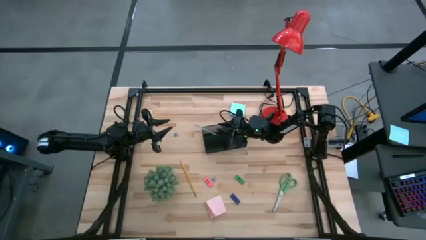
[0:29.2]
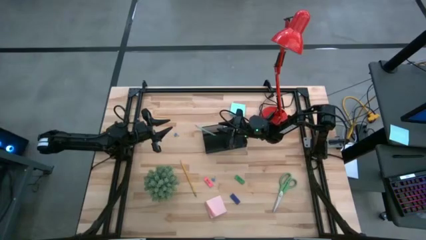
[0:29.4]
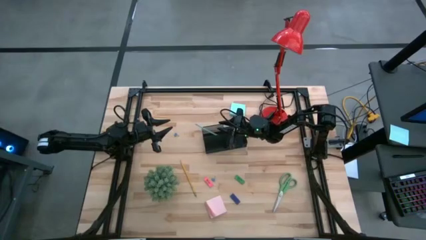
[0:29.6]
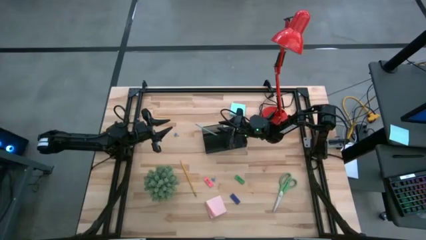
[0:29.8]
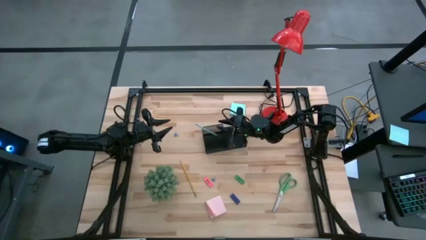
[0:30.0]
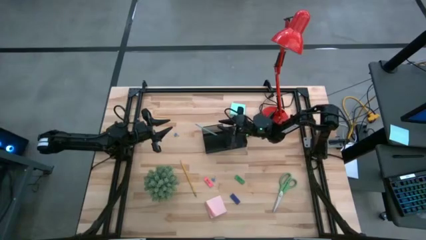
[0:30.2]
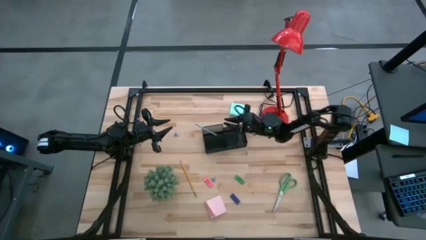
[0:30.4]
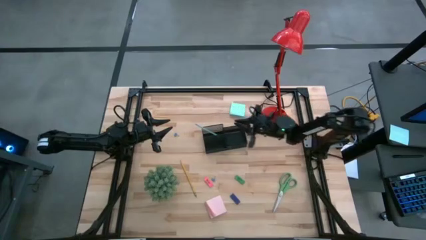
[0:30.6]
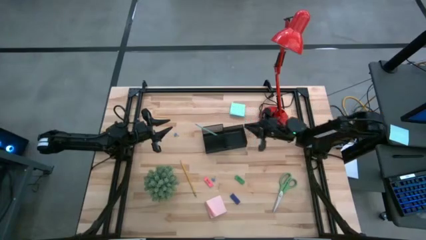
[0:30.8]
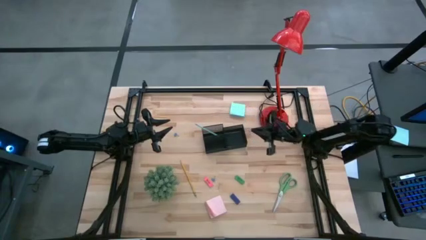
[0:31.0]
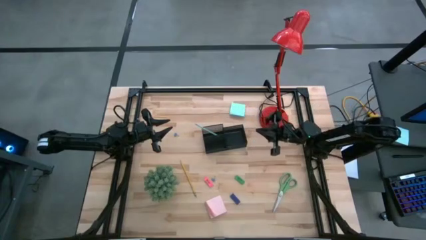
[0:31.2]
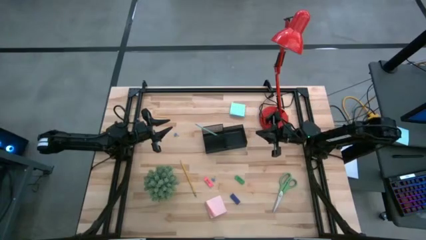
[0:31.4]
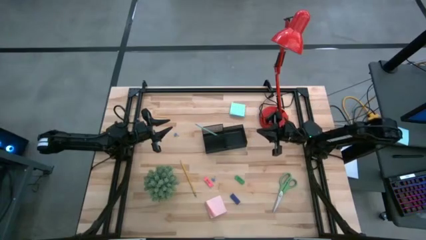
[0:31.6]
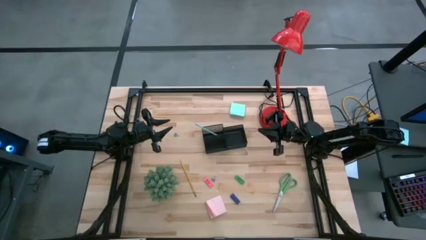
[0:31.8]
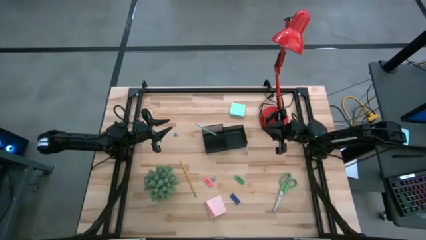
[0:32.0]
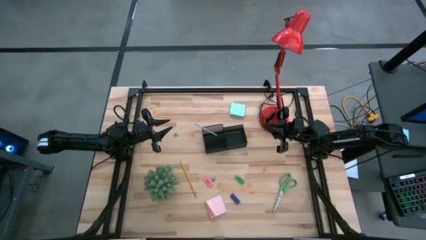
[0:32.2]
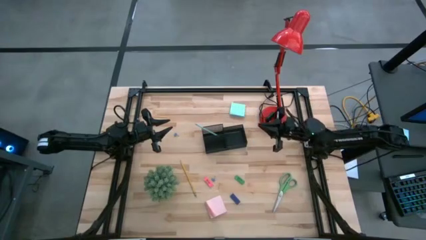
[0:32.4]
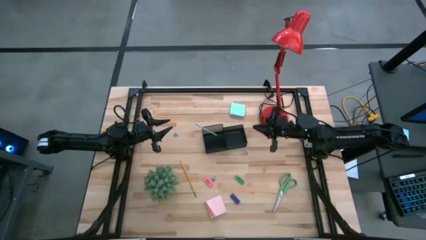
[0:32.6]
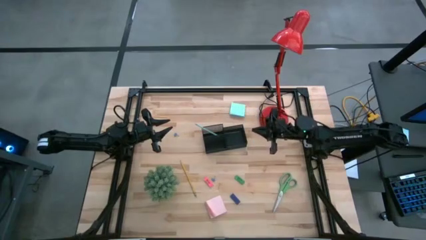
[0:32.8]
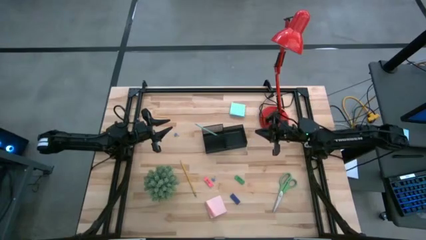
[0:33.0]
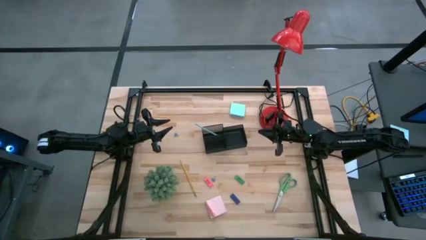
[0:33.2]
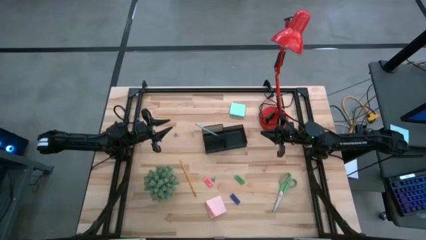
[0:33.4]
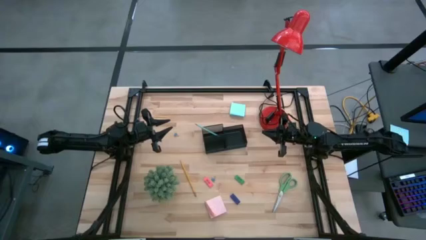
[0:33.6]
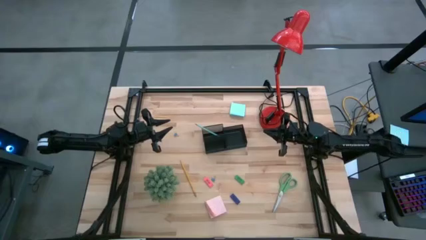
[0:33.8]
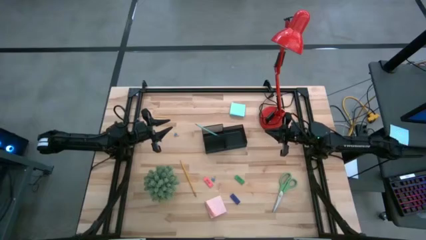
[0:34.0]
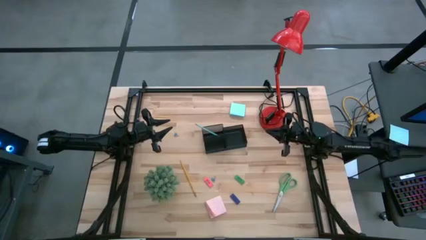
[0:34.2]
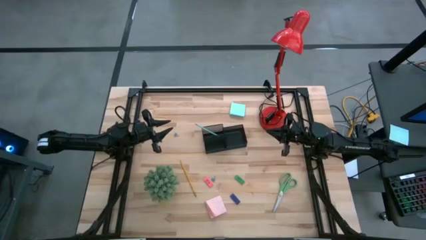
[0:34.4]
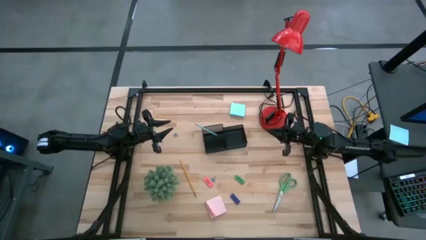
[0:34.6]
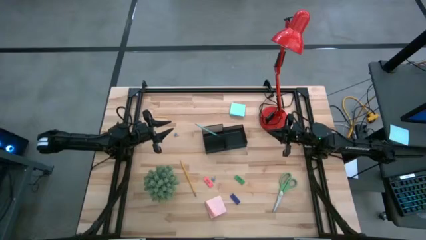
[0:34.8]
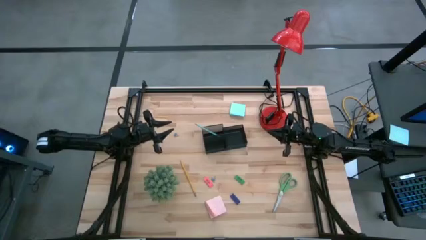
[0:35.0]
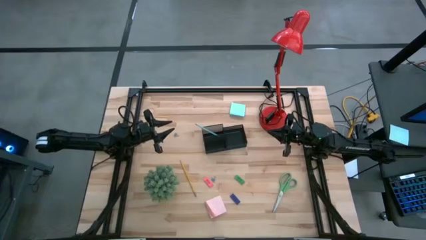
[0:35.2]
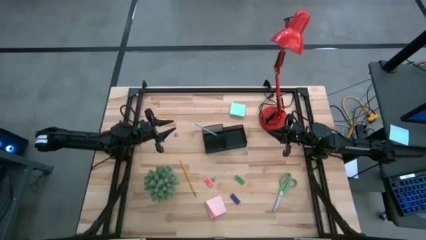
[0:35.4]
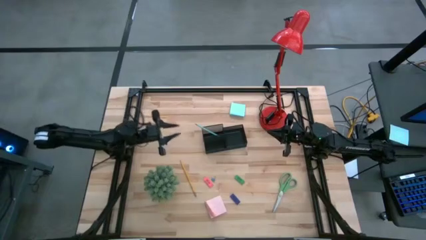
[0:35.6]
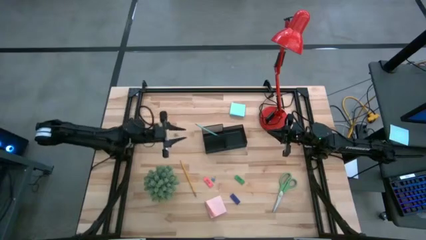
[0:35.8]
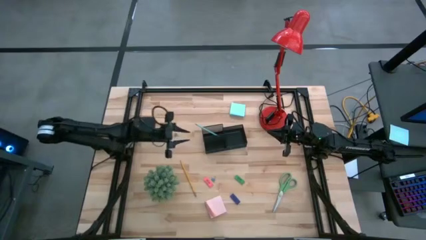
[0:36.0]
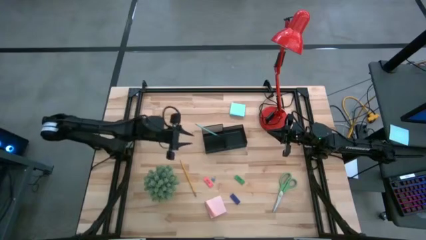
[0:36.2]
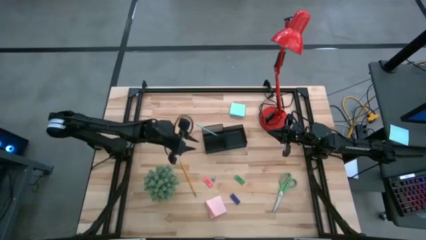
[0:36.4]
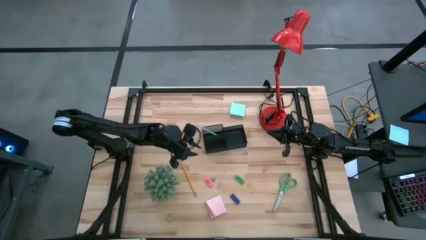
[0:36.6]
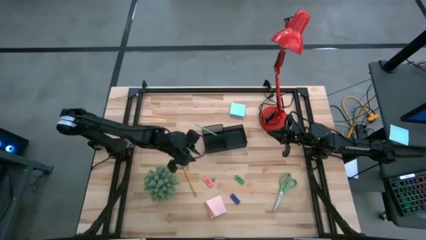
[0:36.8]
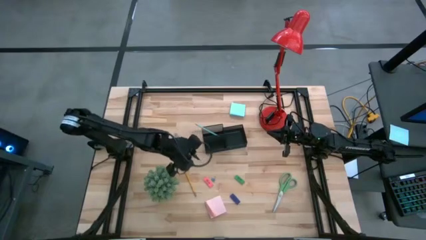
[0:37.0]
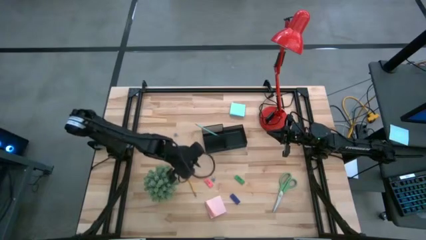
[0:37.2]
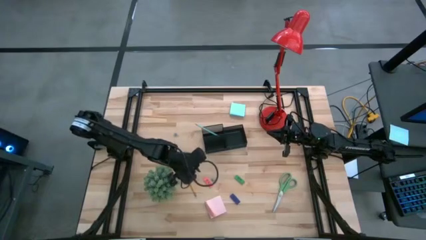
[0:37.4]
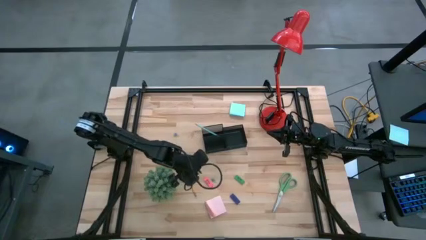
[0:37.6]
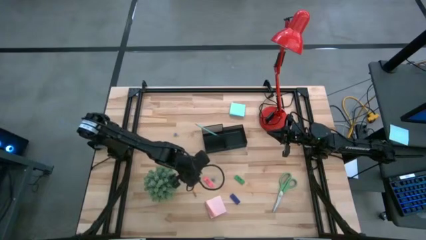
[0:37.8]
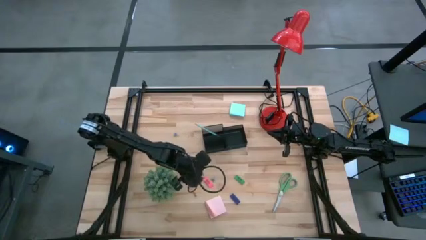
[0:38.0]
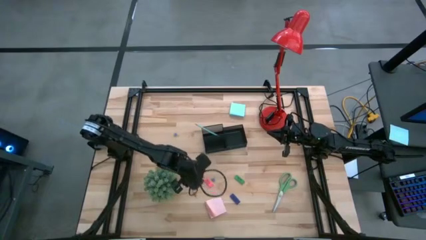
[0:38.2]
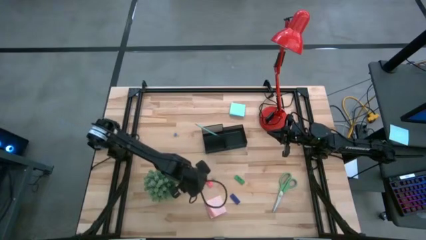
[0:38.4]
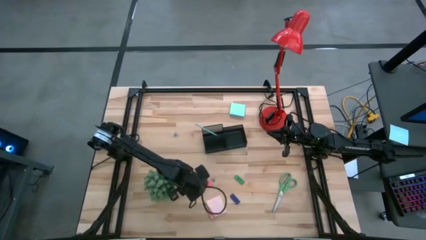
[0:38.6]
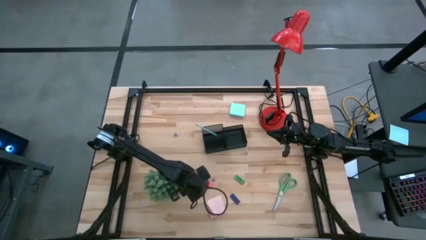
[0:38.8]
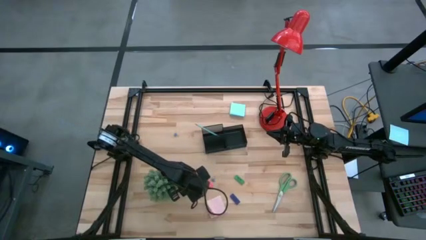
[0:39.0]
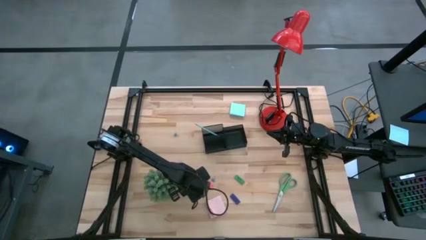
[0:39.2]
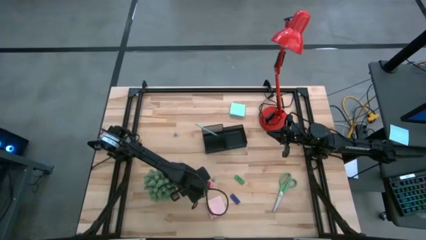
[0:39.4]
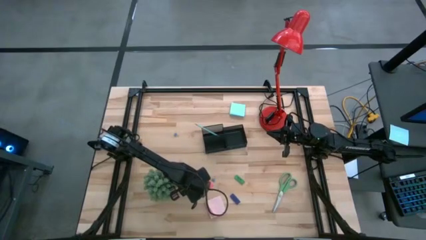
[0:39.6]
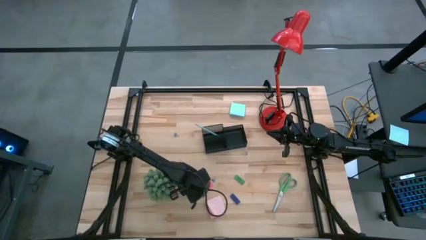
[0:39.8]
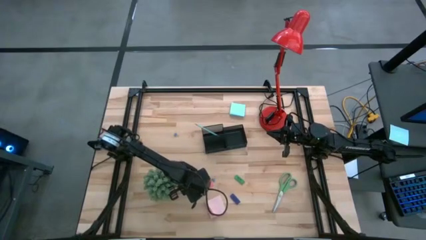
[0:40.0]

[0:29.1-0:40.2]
Task: Pick and place office supplies into organizer
Put the yellow pencil into the black desk organizer
